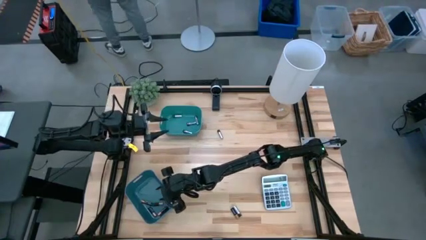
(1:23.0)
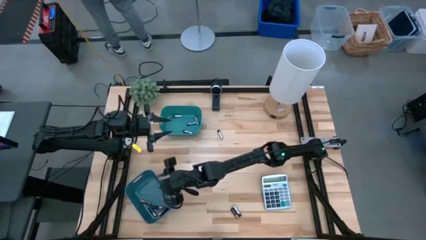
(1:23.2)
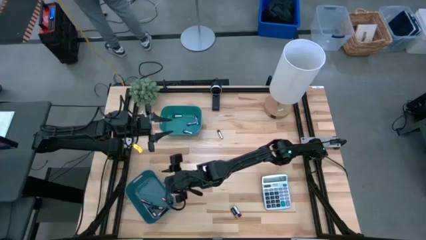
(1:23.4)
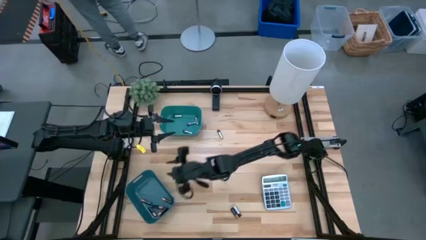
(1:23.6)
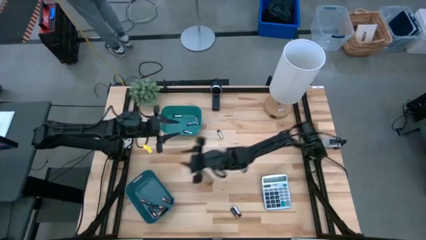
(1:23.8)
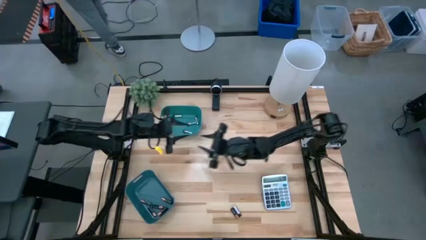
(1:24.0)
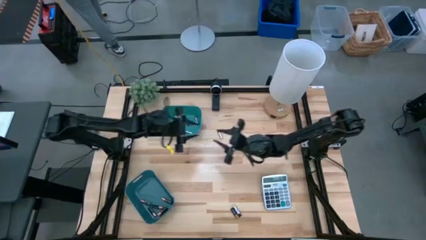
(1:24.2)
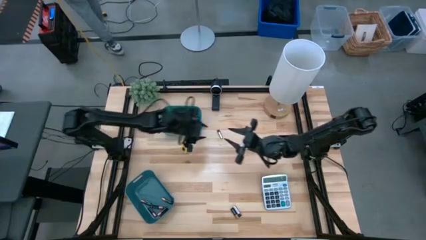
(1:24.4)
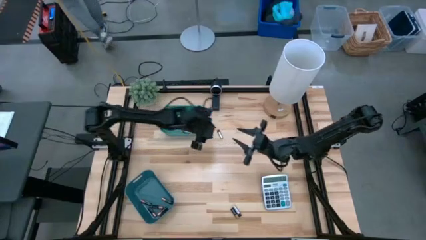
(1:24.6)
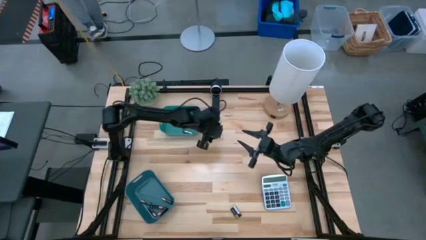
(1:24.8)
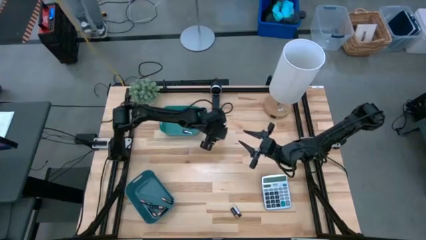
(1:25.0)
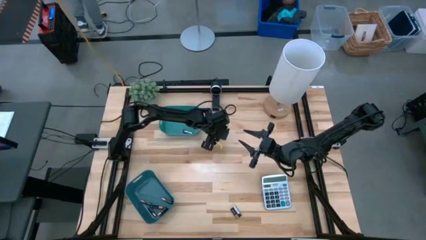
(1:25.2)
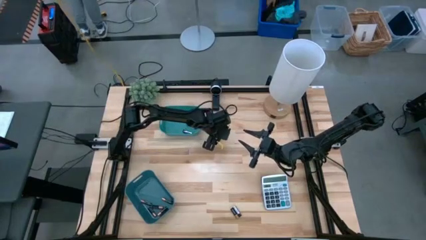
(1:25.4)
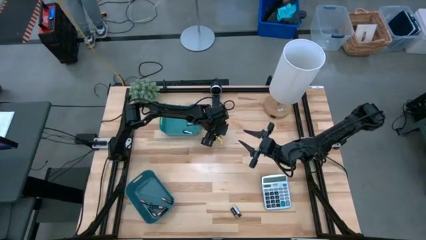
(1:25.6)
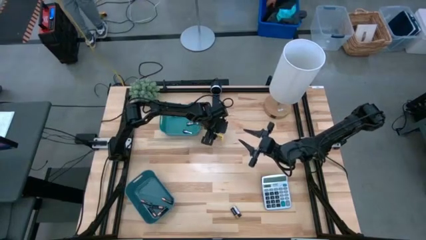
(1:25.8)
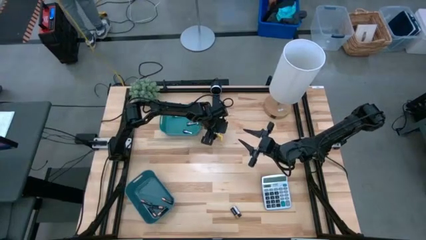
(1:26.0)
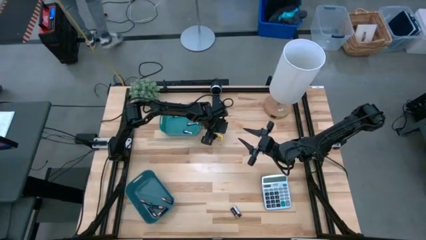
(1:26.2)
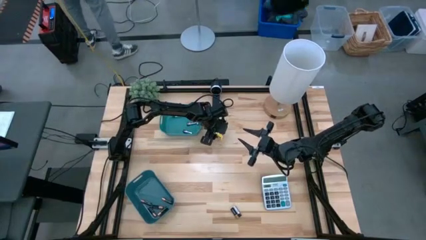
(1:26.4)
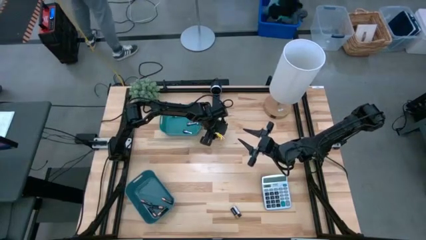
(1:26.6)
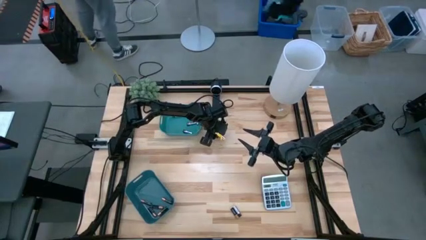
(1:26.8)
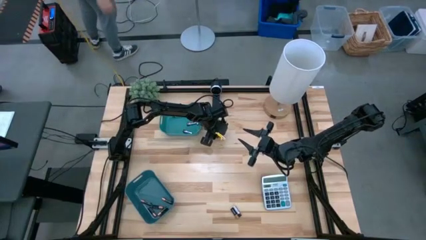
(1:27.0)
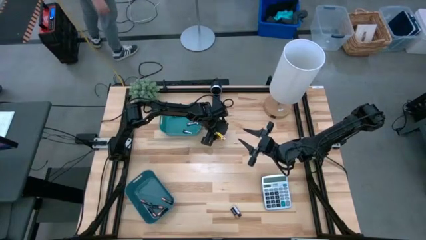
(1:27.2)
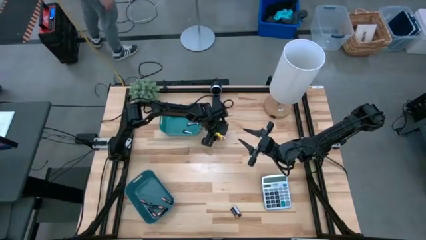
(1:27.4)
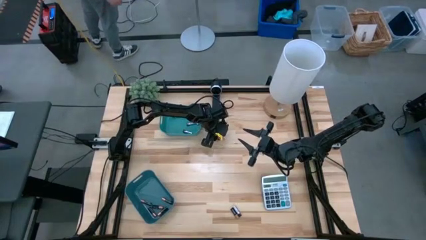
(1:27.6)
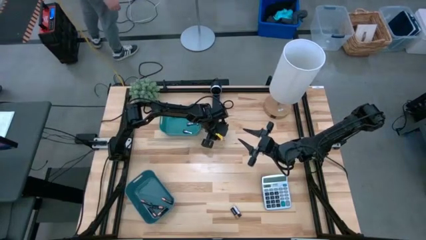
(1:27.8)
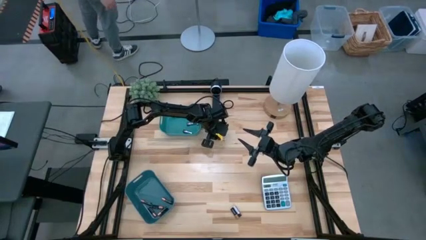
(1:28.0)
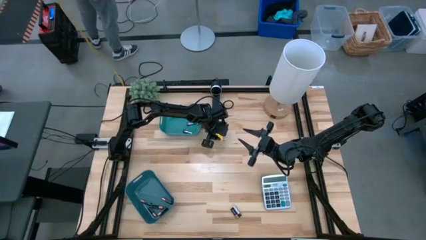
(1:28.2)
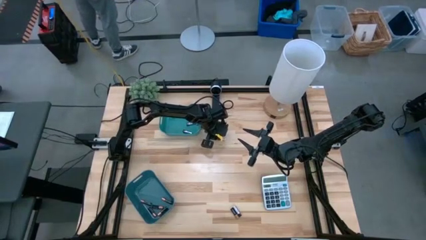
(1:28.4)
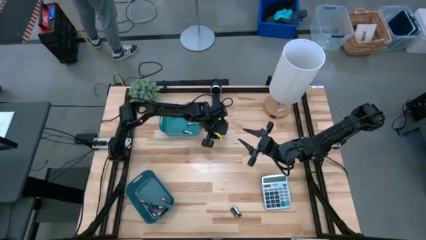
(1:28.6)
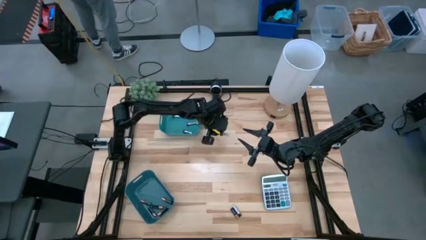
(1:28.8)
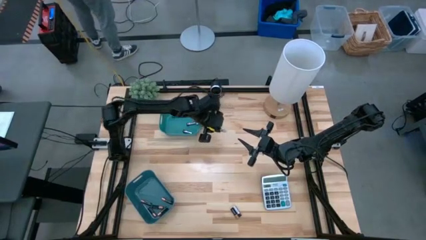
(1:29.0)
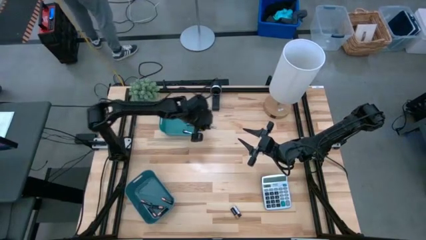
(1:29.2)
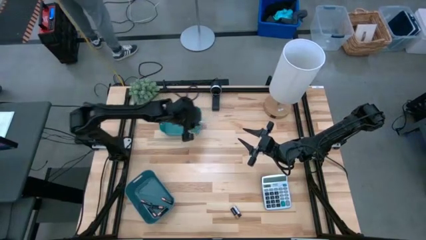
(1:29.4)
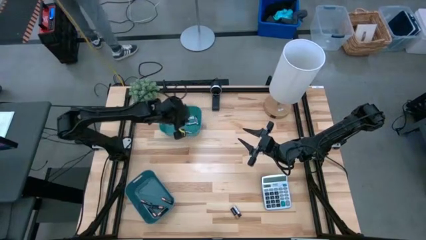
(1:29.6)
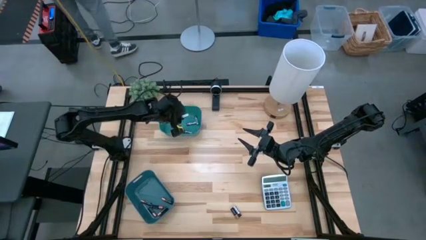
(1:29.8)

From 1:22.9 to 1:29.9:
Task: Sort batteries
Put the top silver battery into the green bin

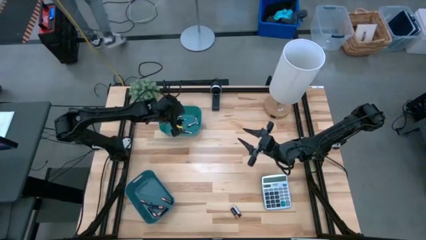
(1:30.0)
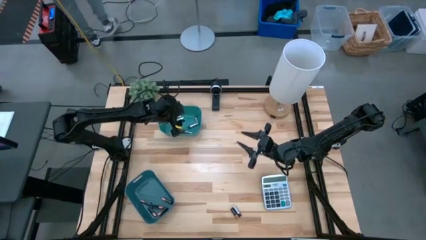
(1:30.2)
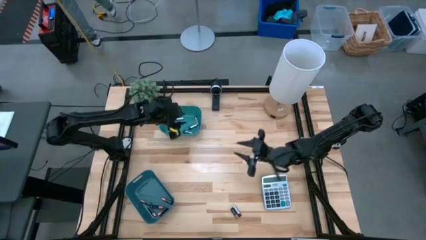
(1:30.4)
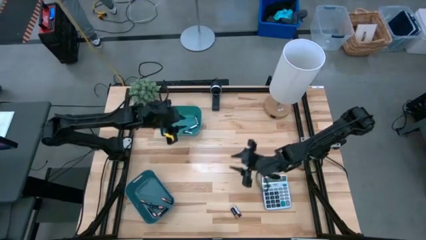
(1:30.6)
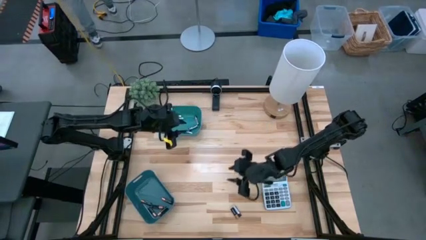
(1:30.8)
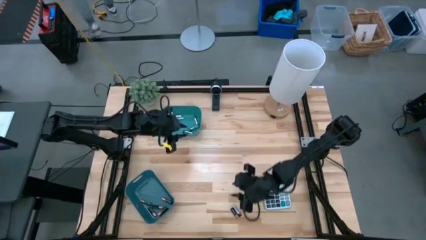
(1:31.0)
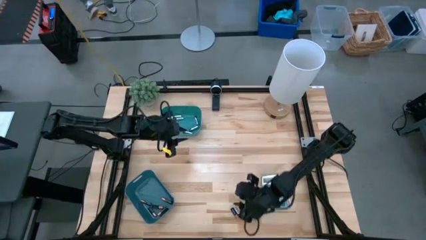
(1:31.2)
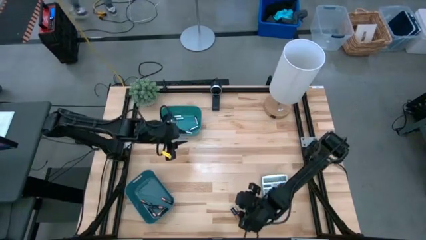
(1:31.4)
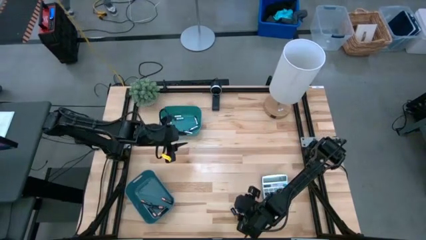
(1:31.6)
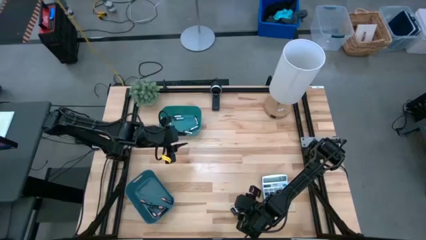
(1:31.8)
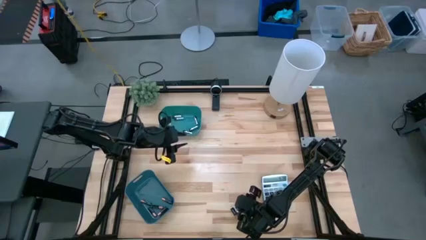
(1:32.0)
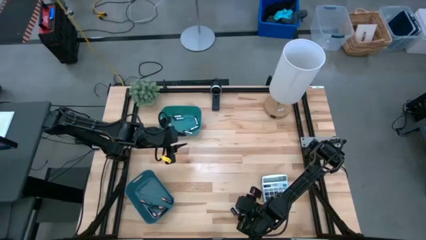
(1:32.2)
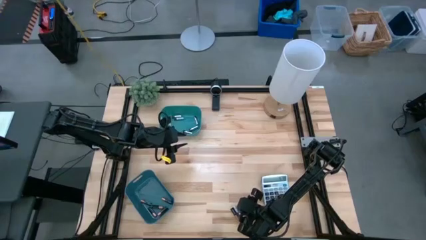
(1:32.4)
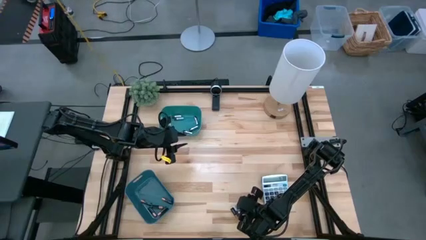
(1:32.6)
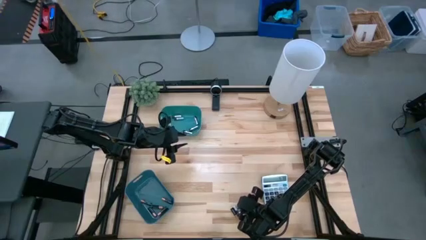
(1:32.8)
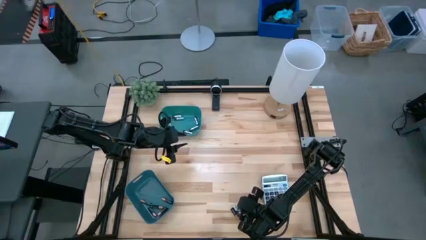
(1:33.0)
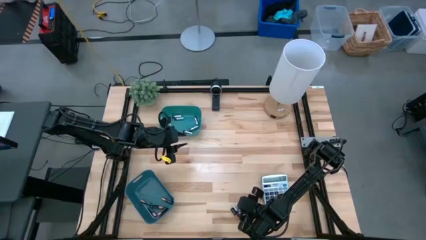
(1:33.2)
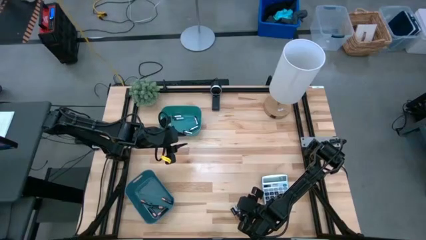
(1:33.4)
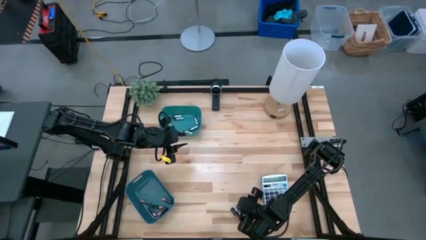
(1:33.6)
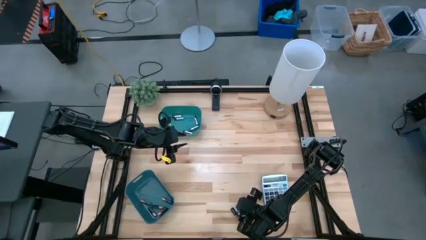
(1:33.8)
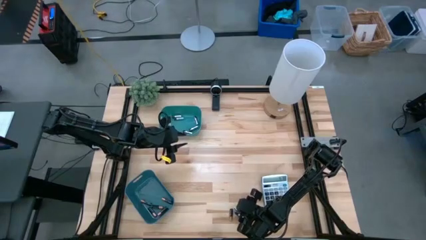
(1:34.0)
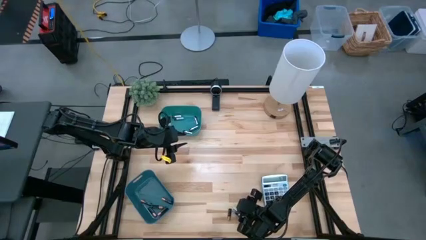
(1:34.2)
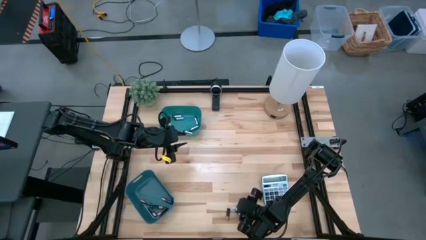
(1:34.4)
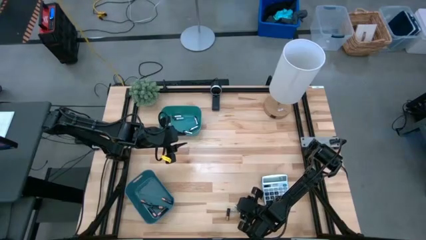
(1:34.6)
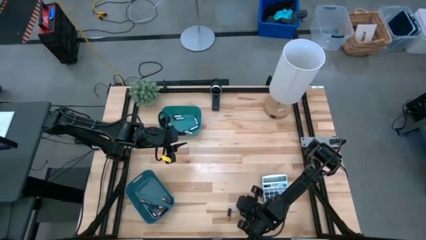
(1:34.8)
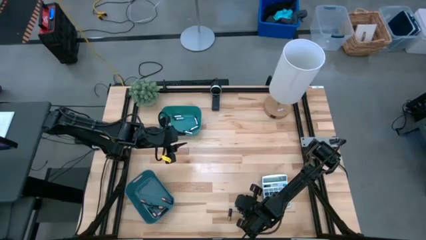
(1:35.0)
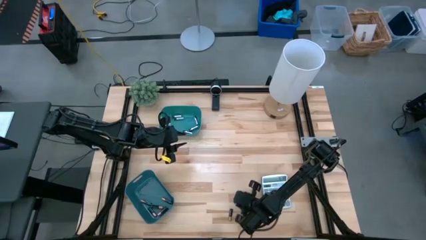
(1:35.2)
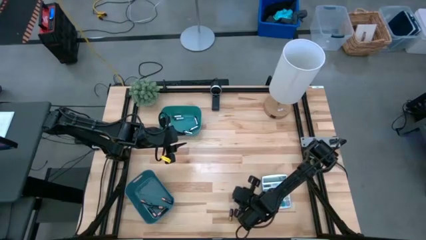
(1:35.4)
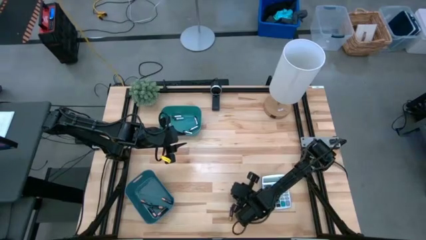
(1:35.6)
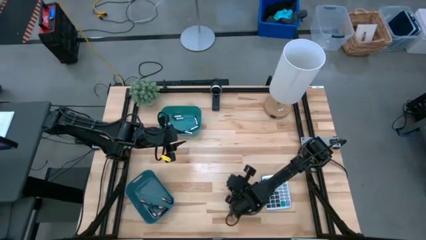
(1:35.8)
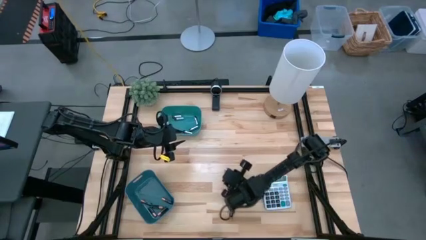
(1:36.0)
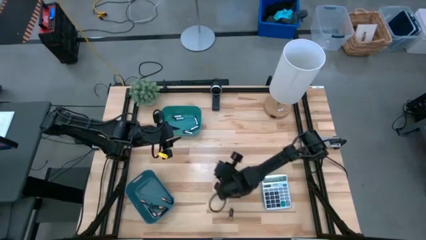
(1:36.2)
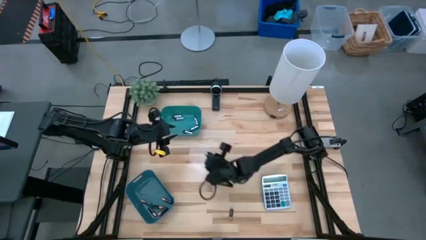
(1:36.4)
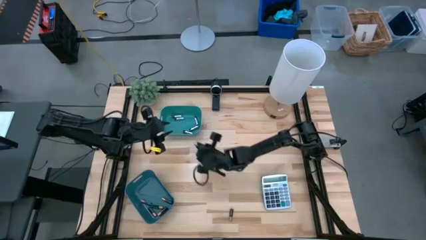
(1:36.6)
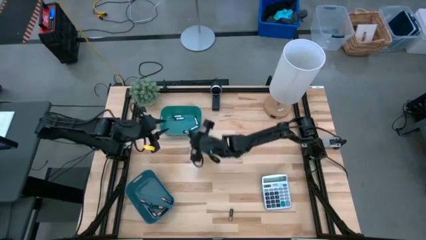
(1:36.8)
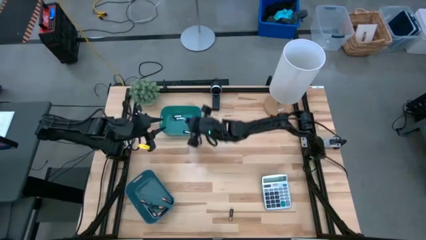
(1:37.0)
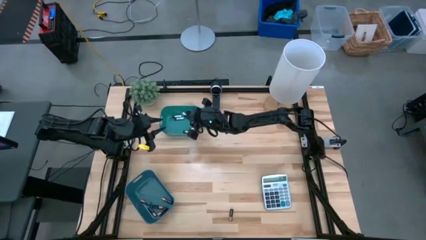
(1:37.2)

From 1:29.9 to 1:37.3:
Put the silver battery into the green bin
